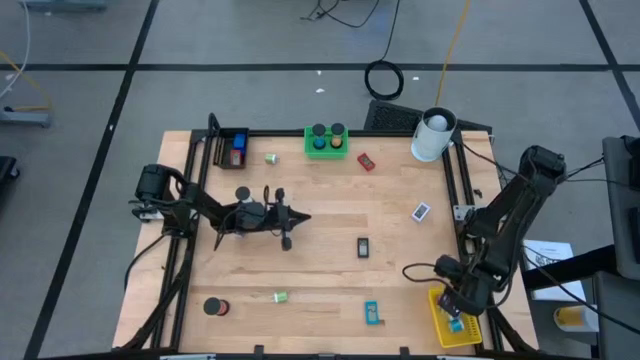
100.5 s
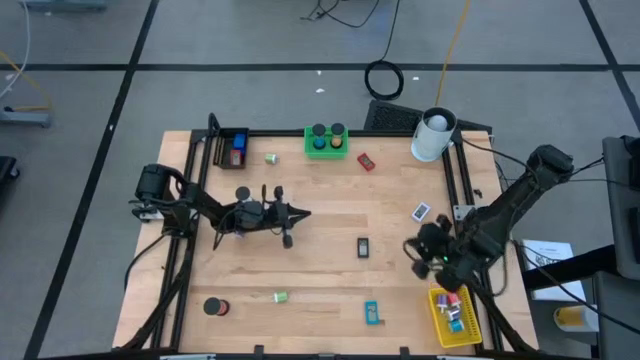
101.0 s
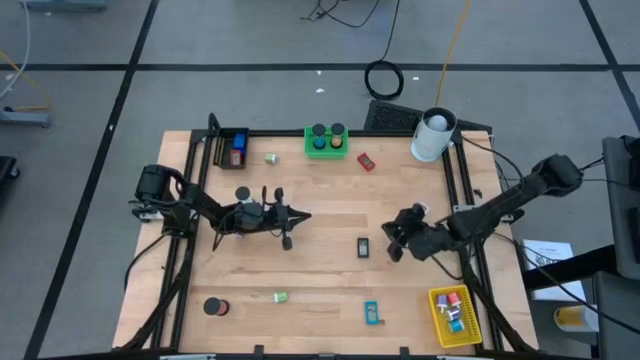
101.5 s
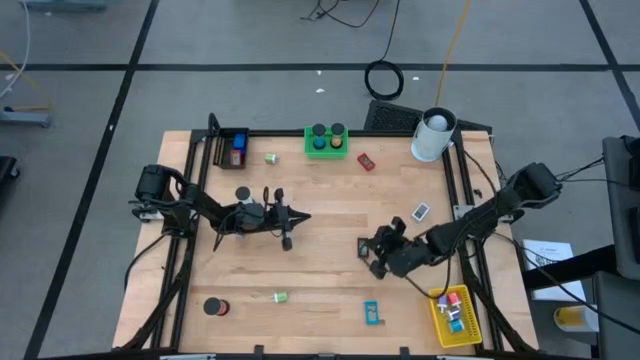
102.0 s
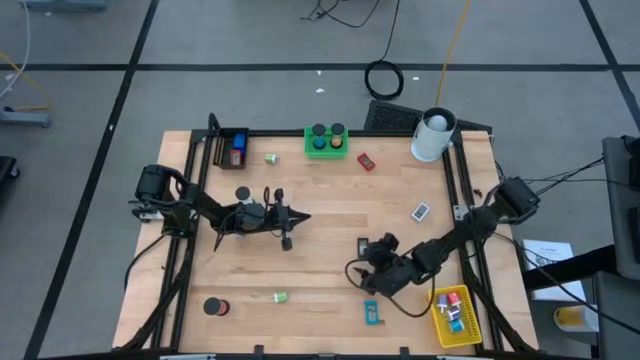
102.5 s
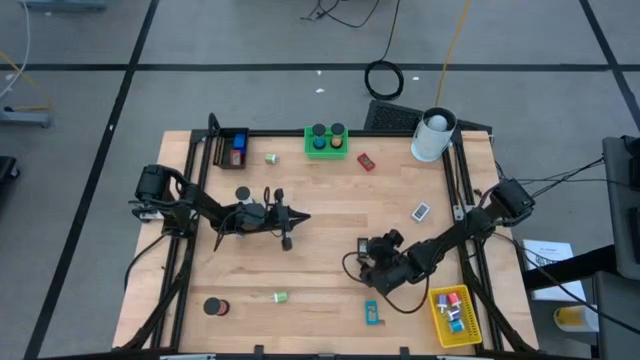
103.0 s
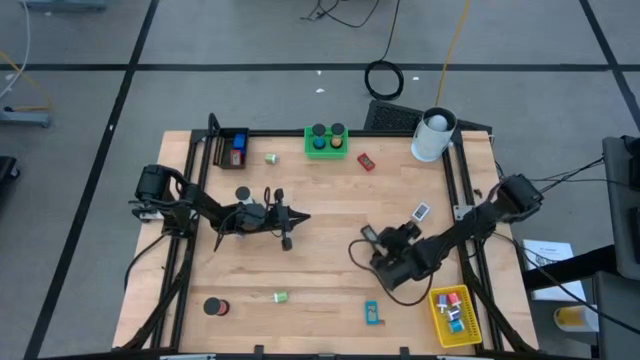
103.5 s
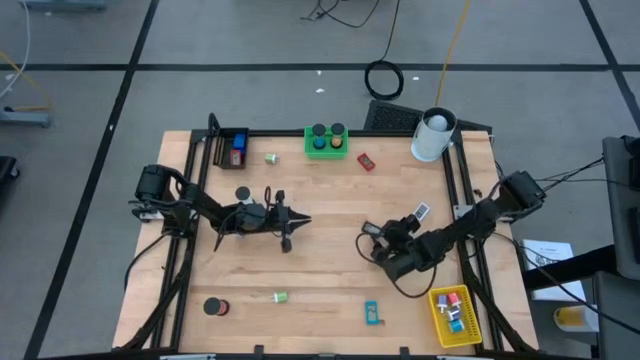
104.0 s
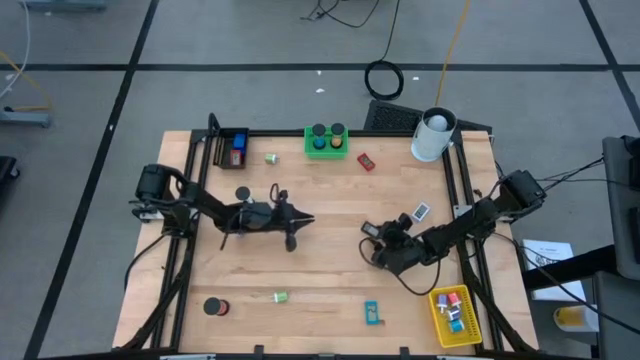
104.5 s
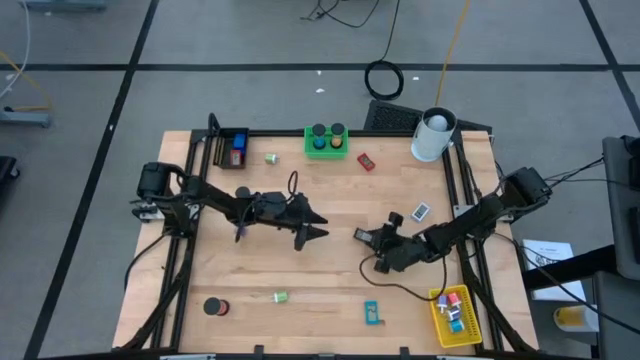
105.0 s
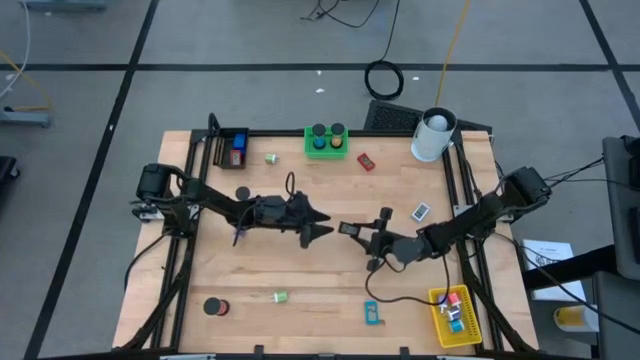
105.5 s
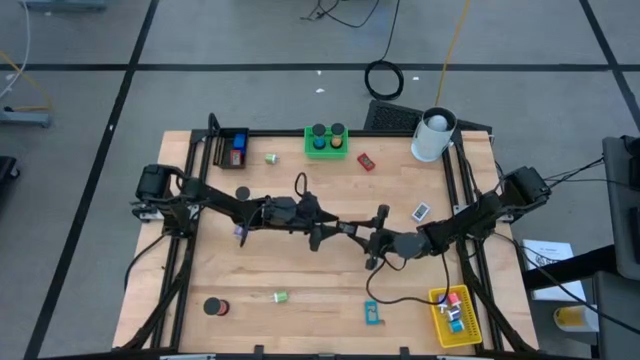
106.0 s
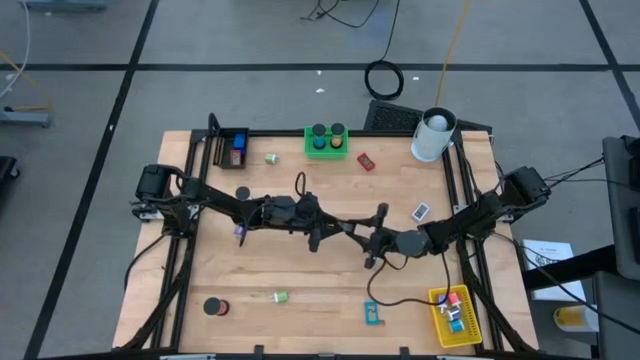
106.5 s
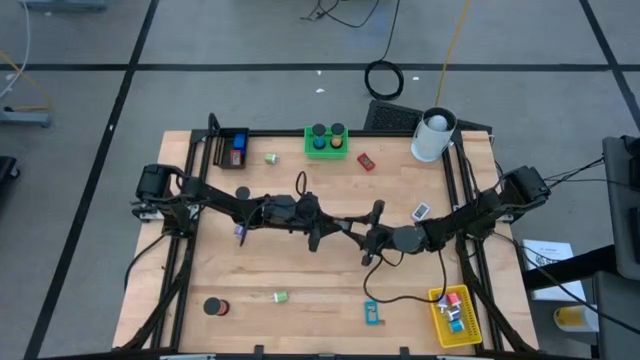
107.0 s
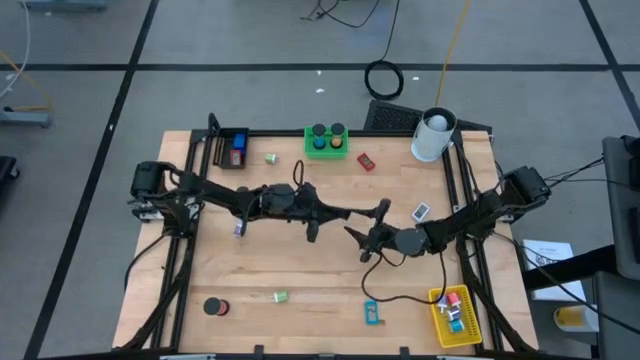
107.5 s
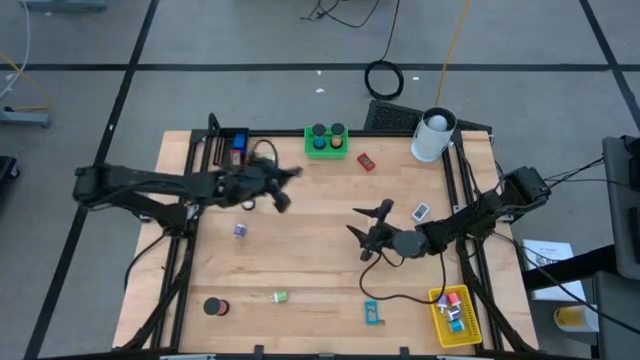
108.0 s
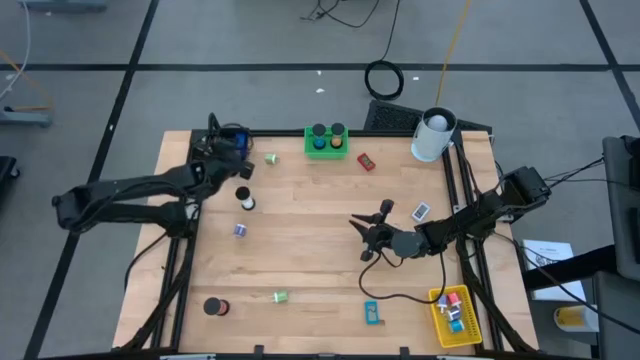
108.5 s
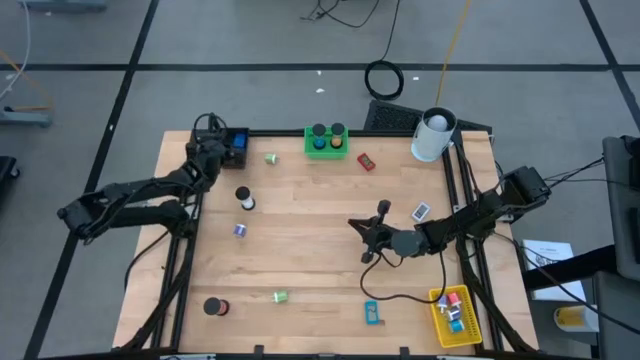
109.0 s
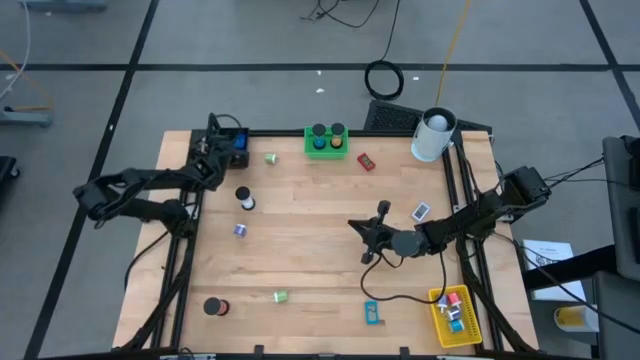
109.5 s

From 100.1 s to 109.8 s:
Task: Pick & Place Office items
Put the black digital clock into the black basket

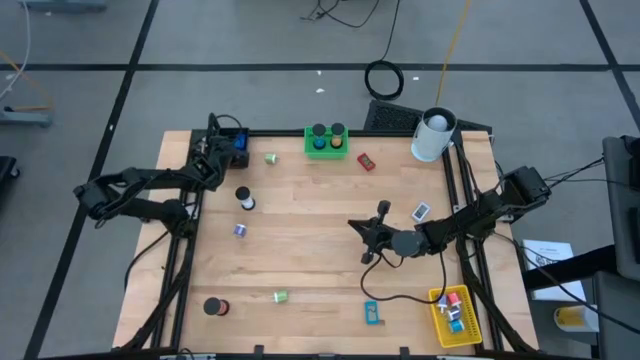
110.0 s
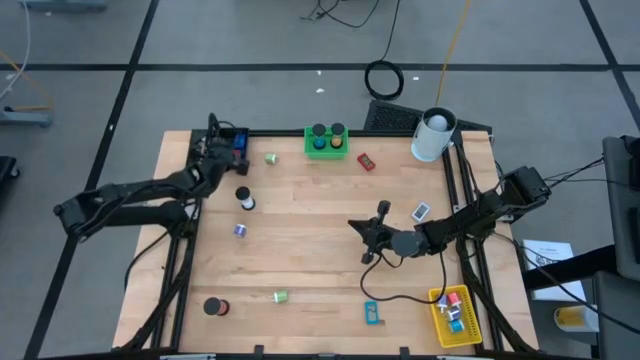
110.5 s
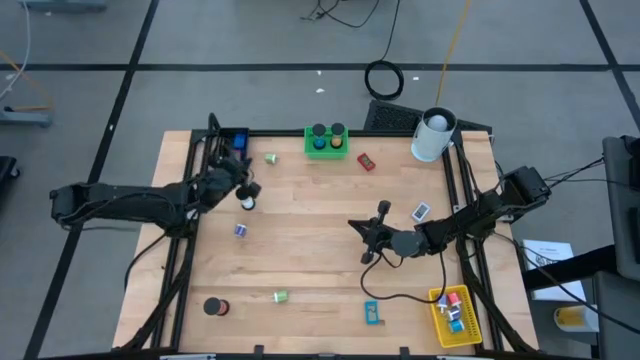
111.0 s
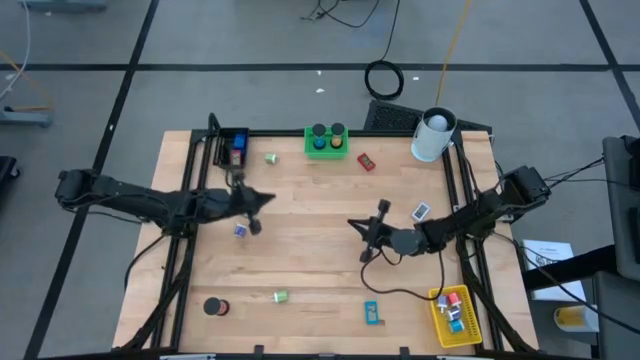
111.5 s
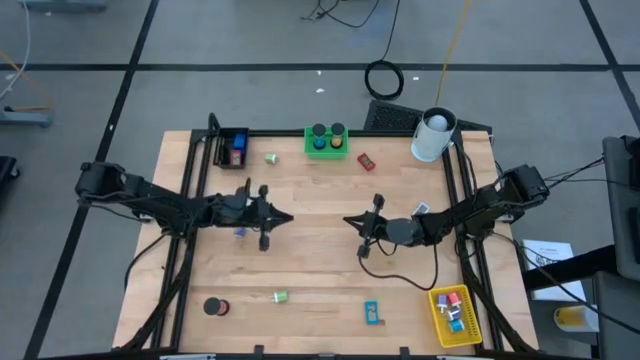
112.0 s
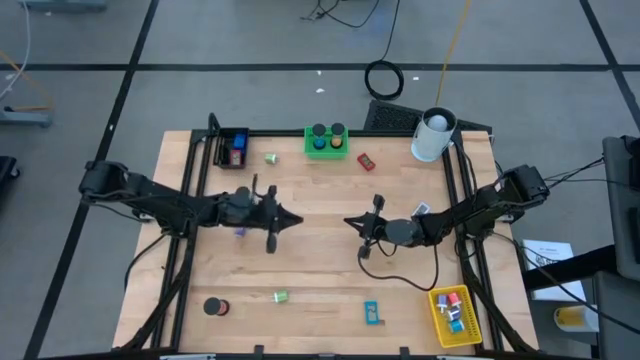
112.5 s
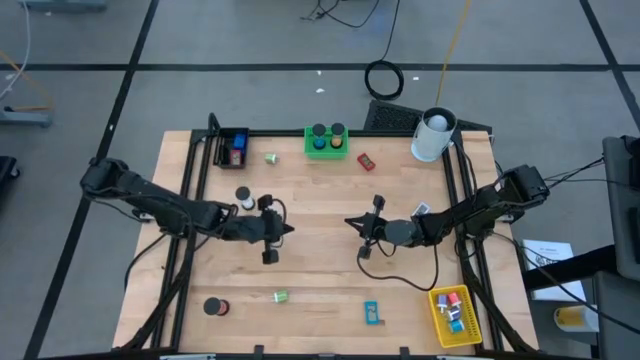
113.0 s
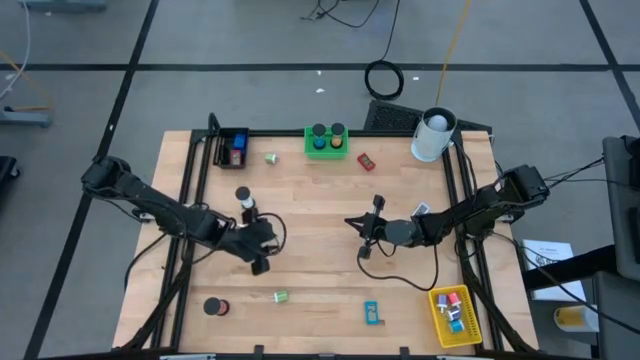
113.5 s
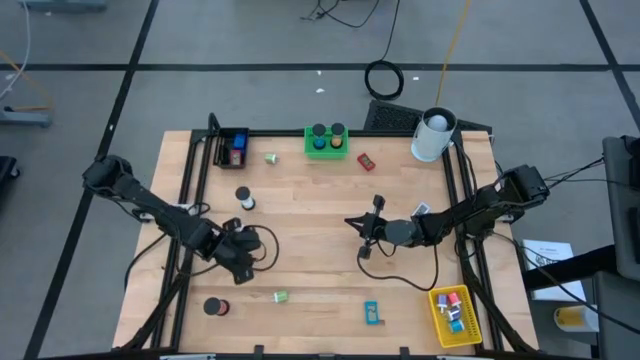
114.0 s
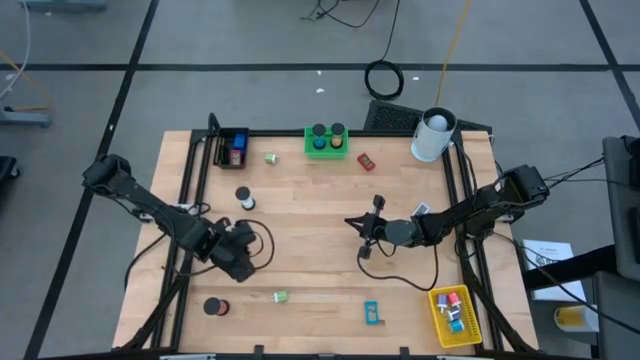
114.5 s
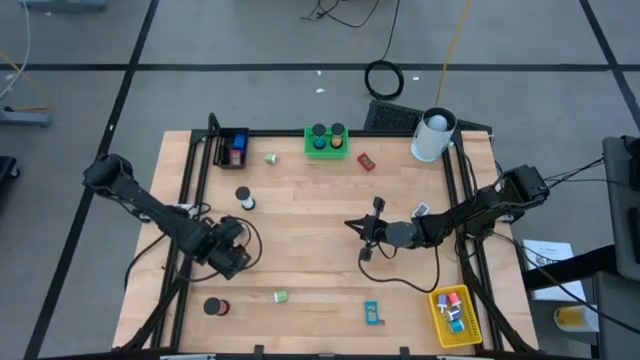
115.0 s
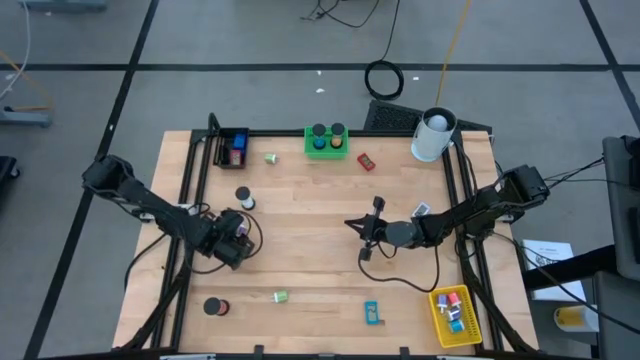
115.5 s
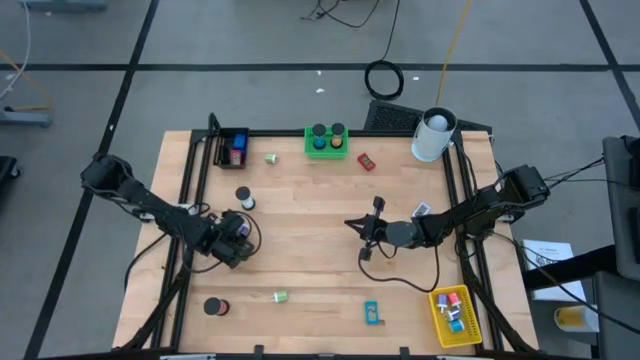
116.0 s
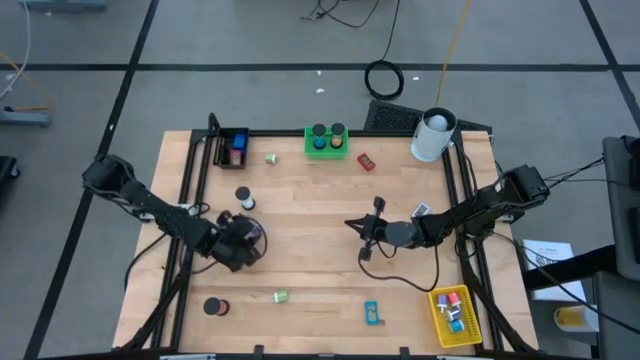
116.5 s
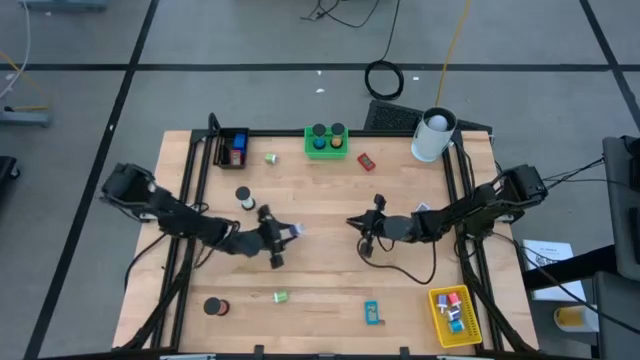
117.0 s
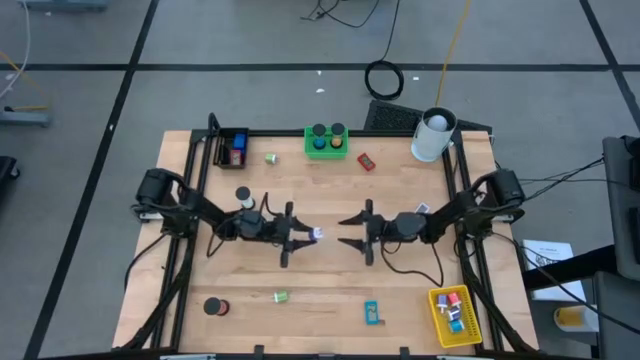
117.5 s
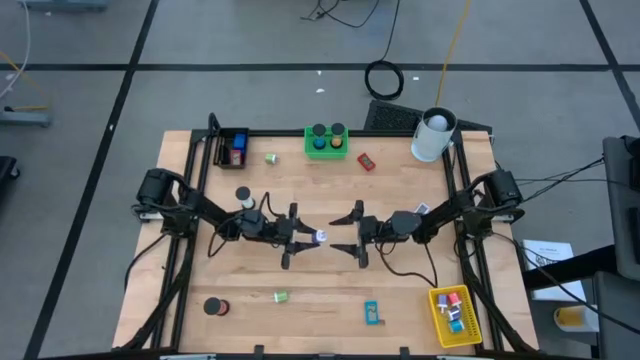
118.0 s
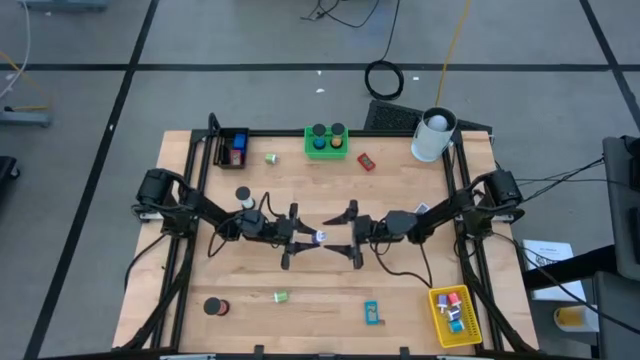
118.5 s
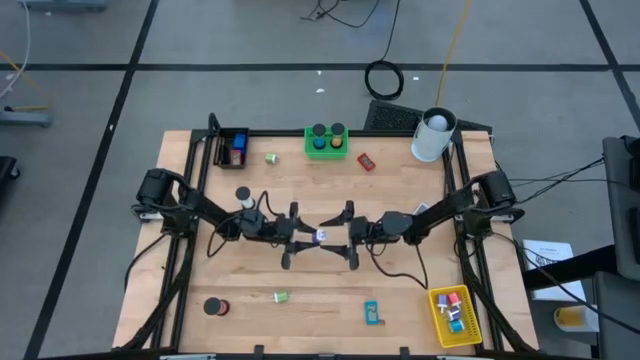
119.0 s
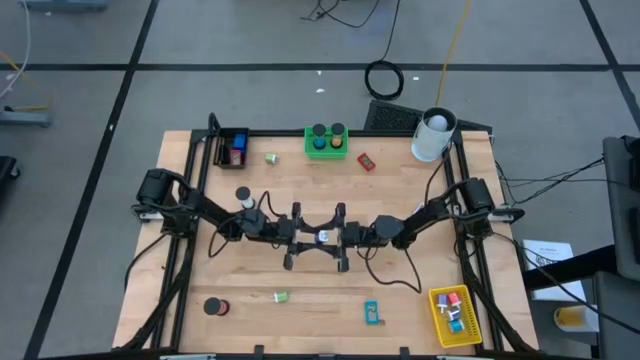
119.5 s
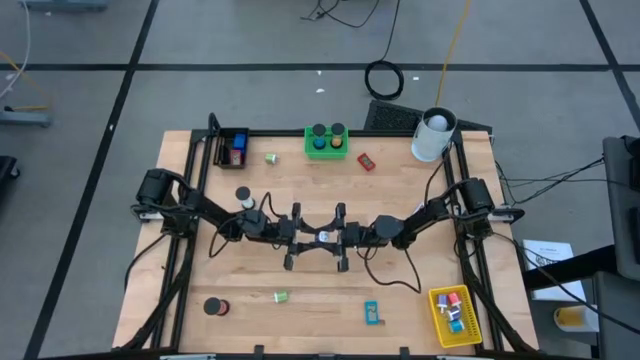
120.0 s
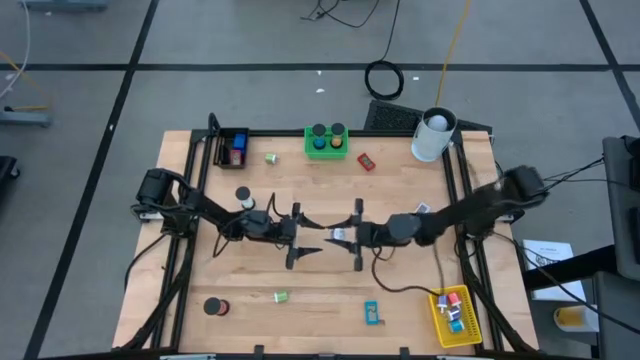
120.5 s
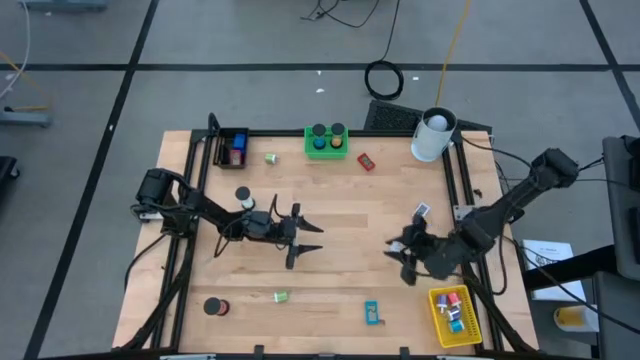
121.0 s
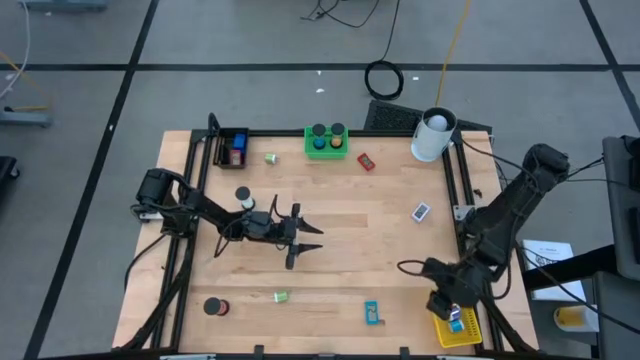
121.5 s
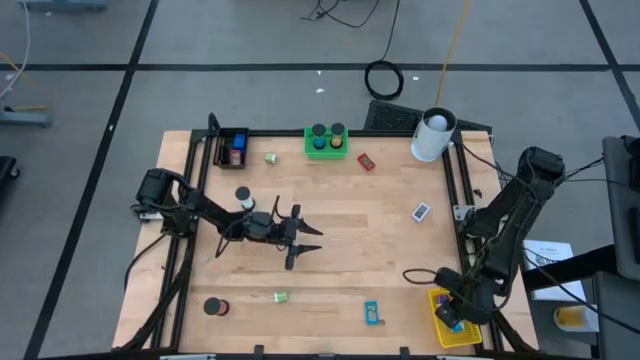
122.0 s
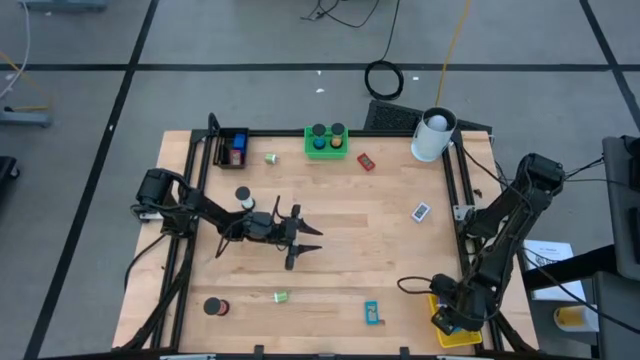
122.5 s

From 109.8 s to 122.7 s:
Put the purple charger adapter into the yellow basket
